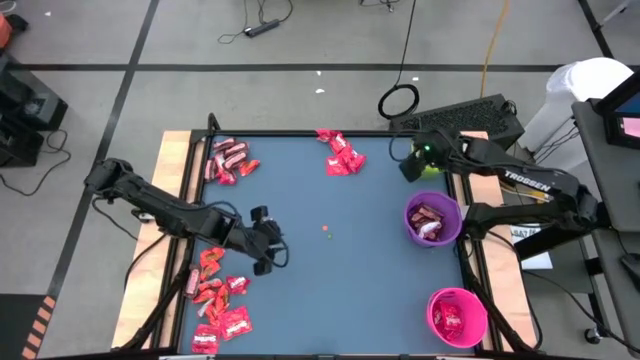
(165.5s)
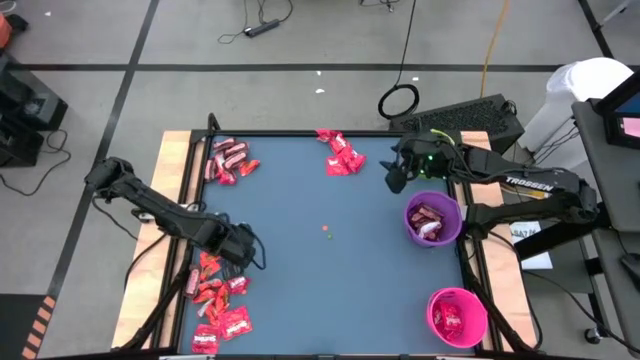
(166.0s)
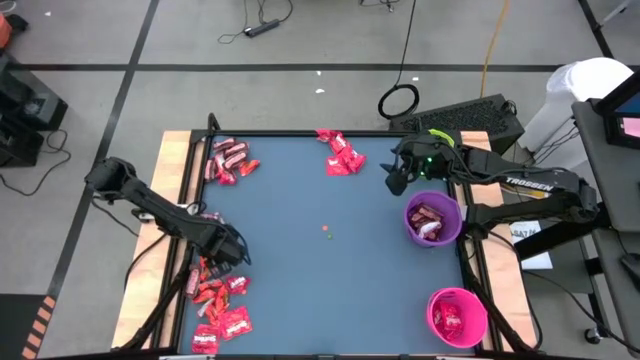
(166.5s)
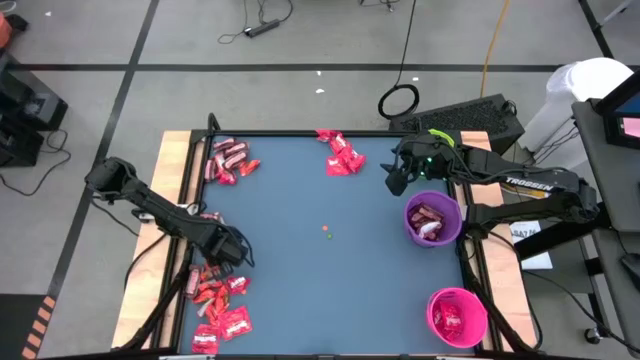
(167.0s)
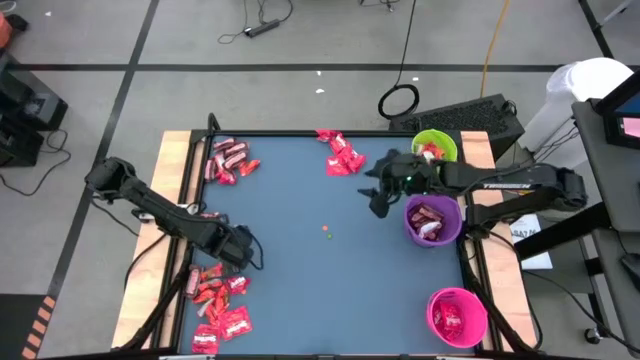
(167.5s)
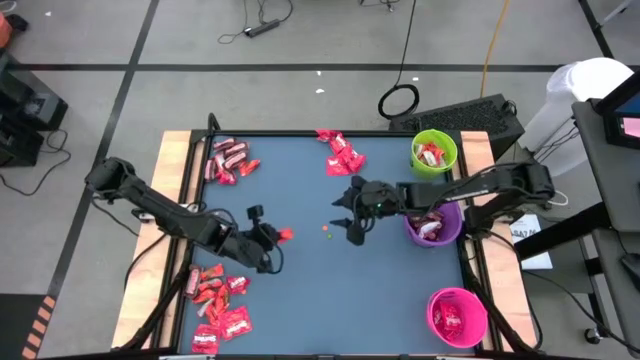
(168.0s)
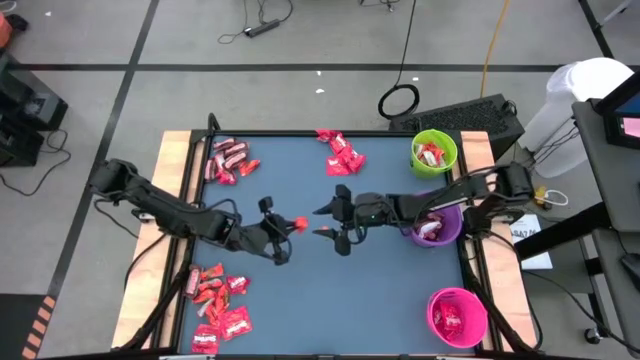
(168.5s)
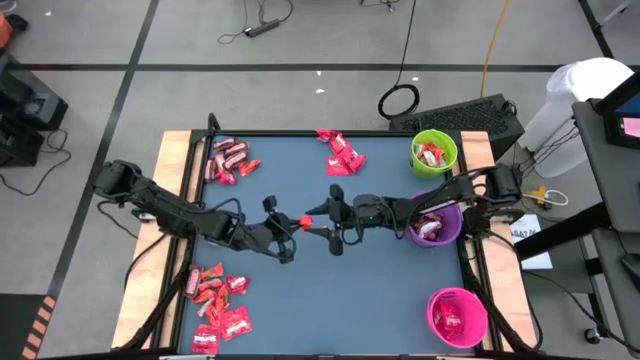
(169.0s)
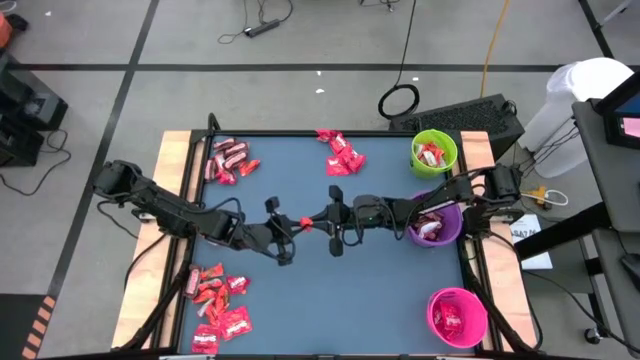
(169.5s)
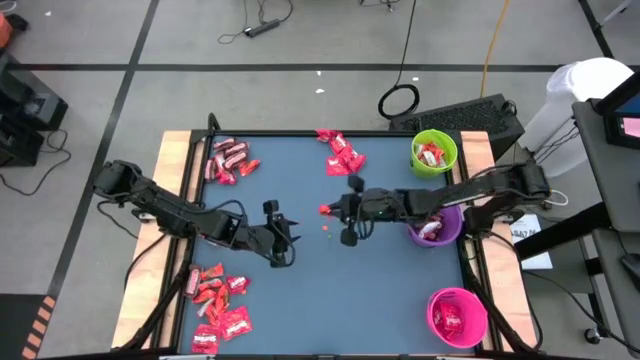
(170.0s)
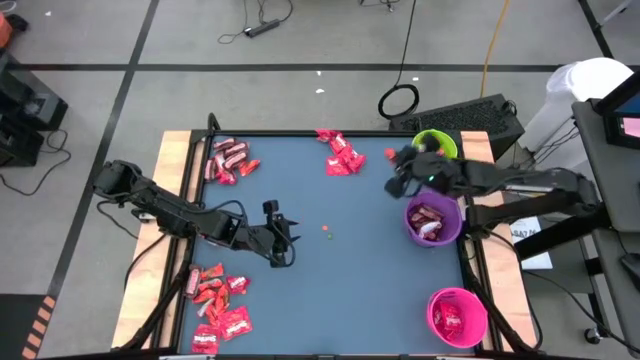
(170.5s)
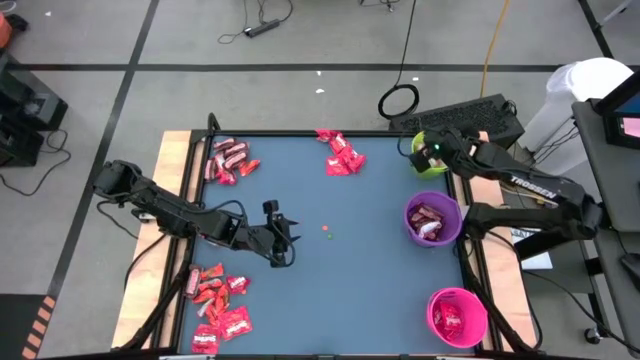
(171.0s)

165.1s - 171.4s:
Task: Organize candy in baskets
Put the orange chocolate bar into the green bucket

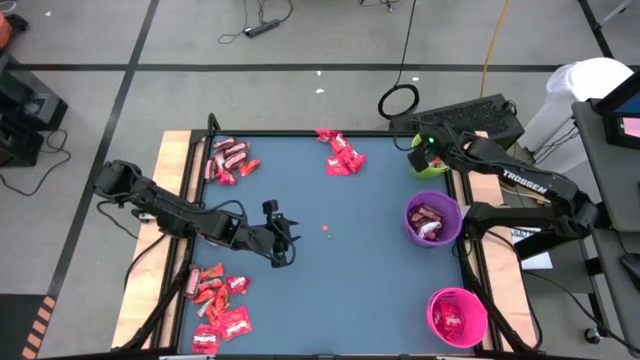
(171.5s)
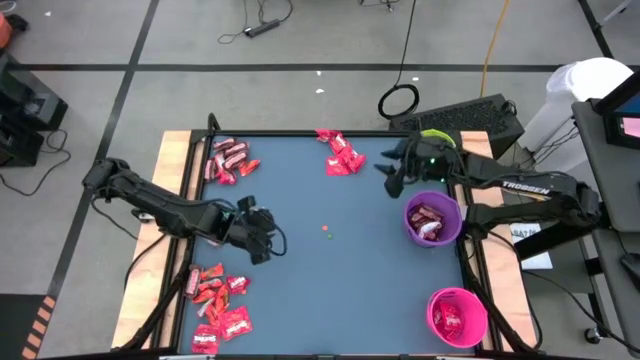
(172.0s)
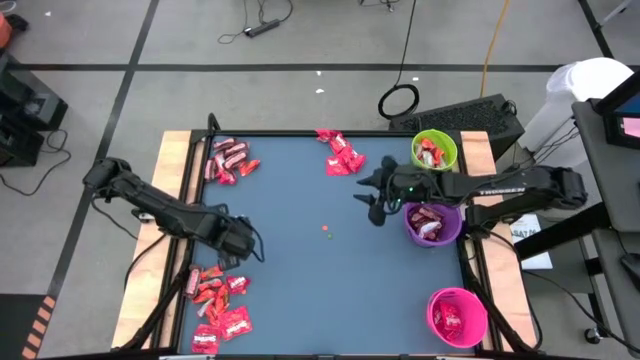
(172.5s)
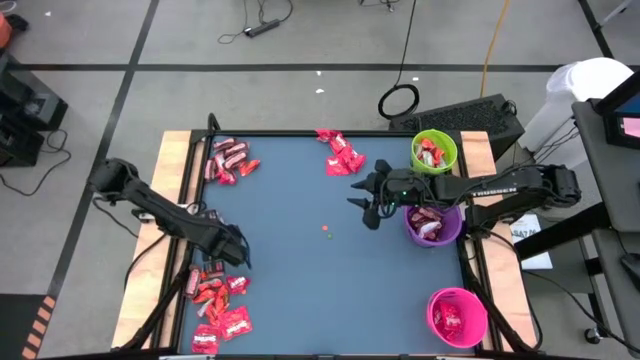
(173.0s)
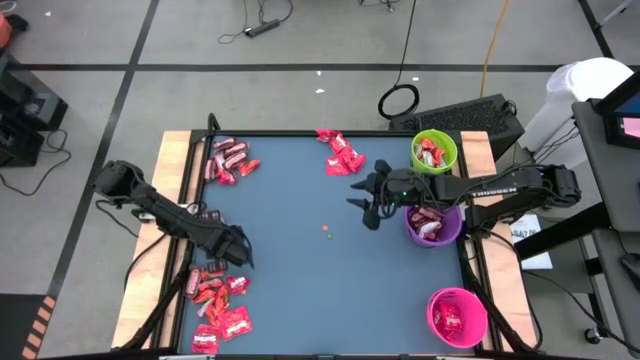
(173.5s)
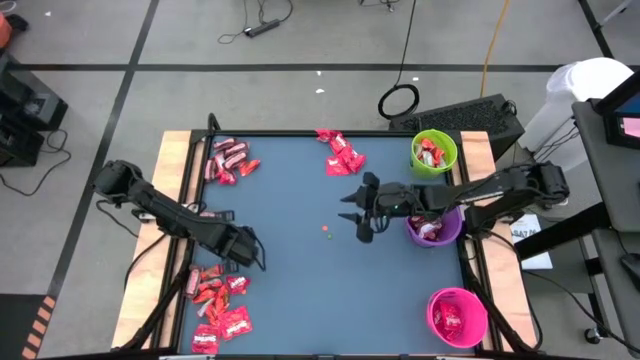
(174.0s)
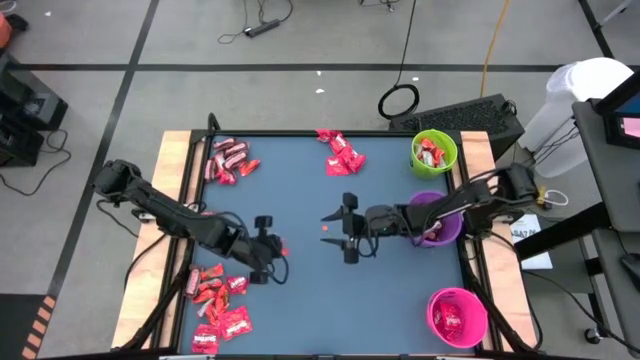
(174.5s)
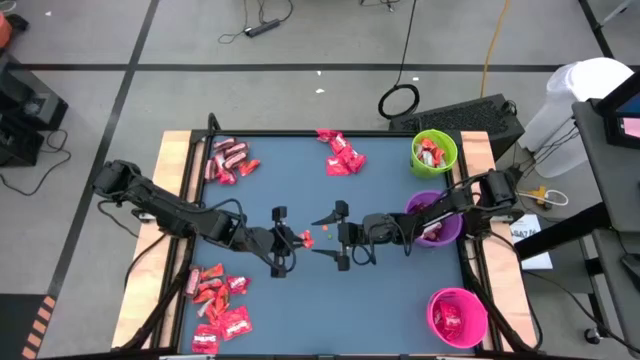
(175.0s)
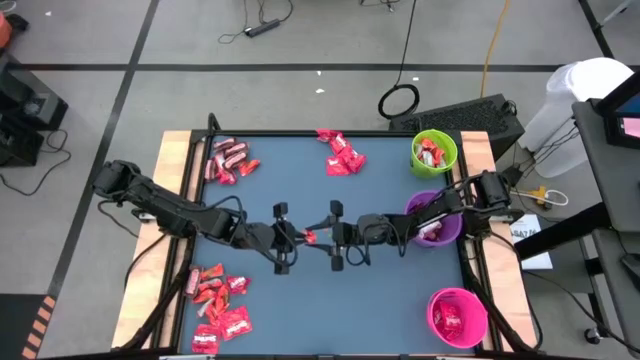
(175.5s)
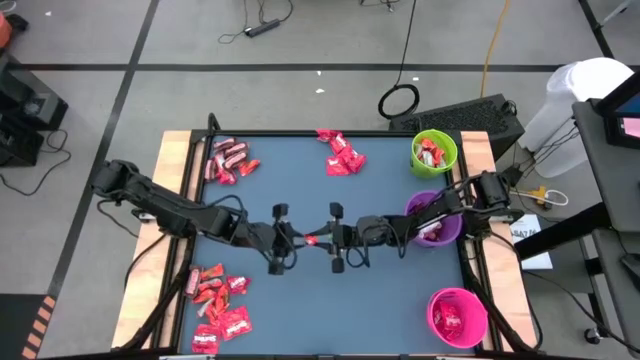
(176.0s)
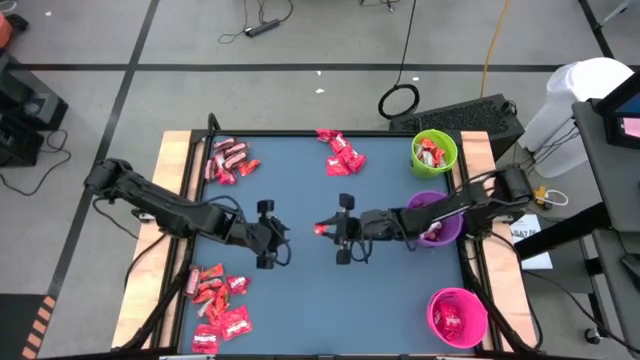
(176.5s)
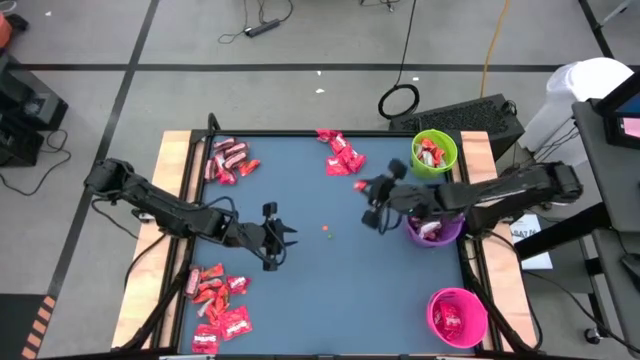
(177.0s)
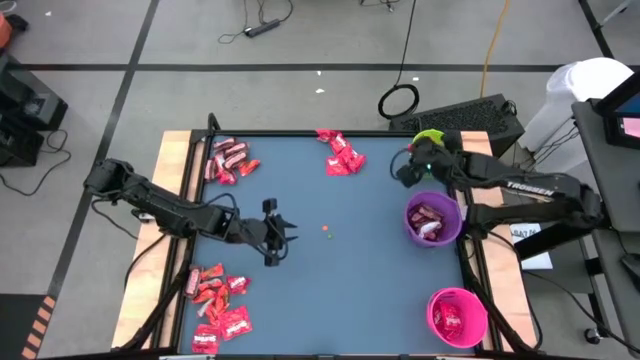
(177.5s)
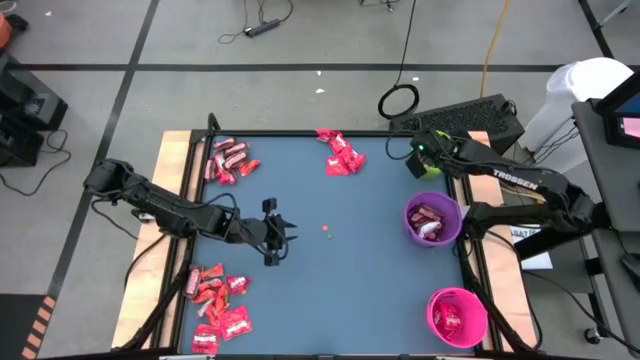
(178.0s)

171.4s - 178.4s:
Put the orange chocolate bar into the green bucket

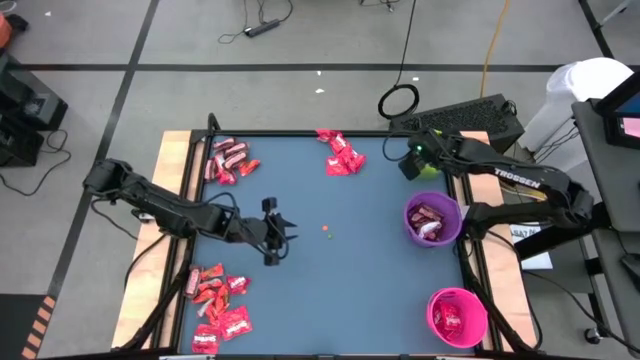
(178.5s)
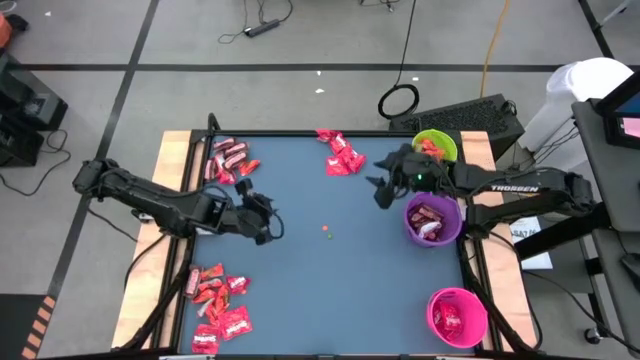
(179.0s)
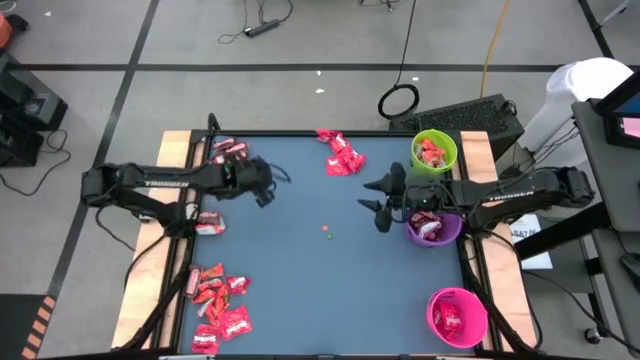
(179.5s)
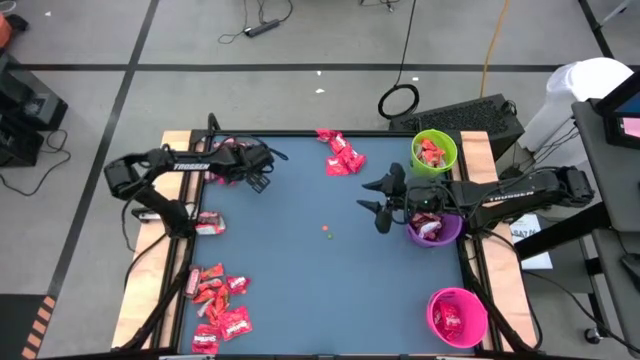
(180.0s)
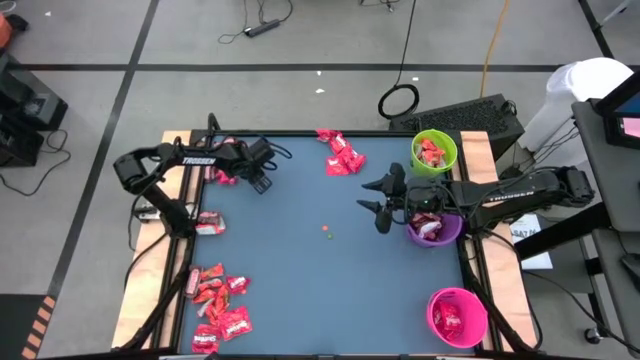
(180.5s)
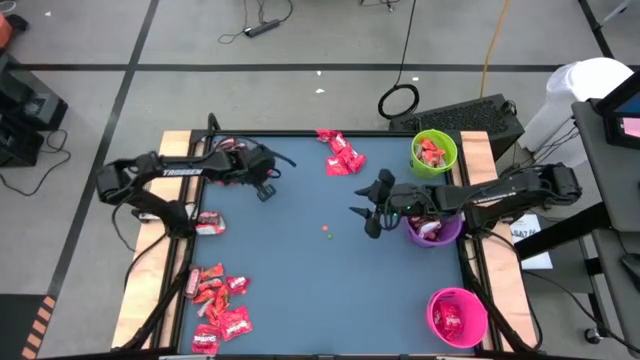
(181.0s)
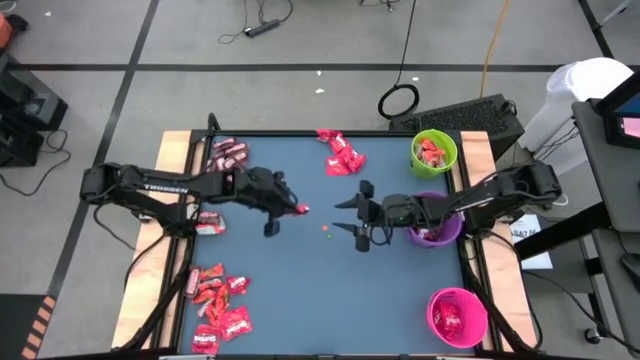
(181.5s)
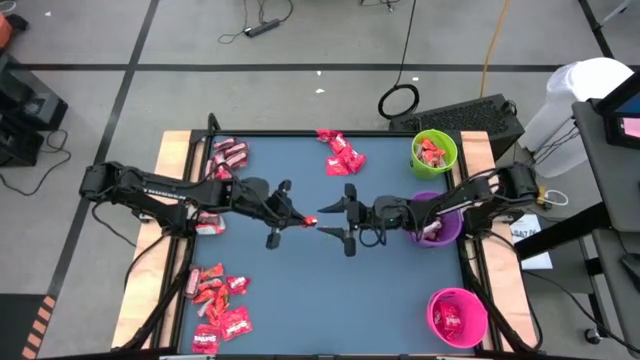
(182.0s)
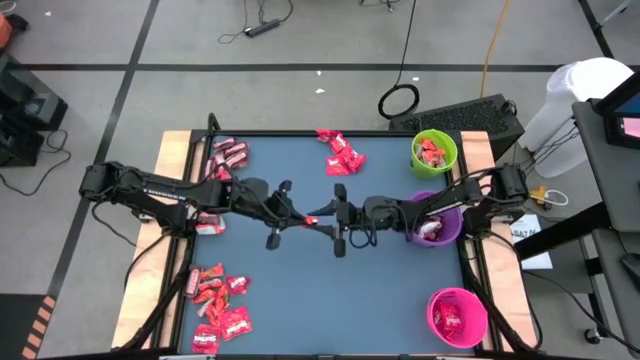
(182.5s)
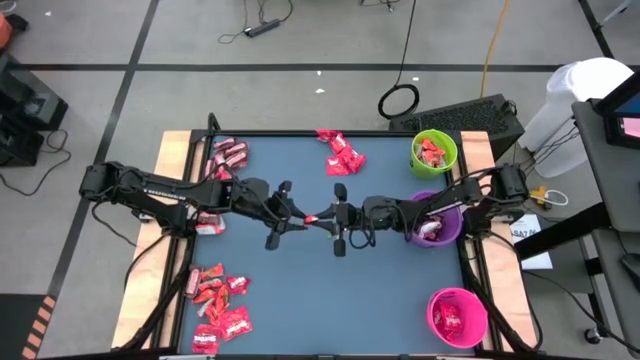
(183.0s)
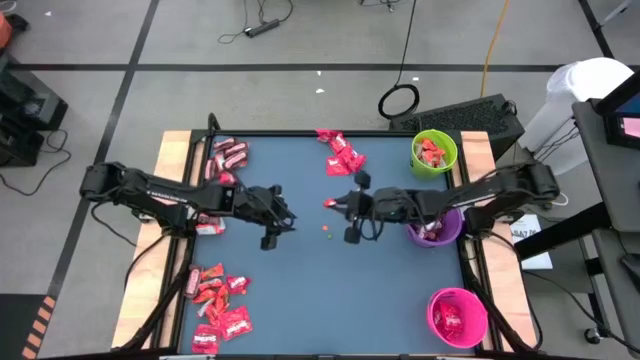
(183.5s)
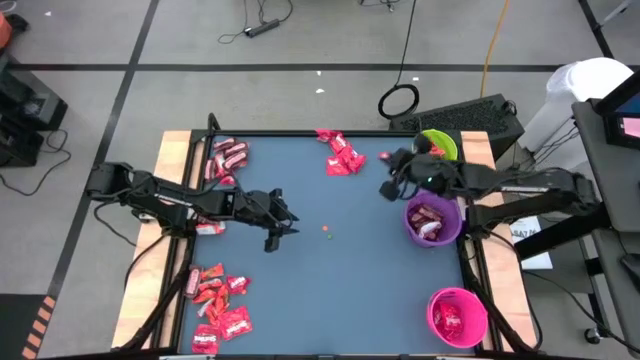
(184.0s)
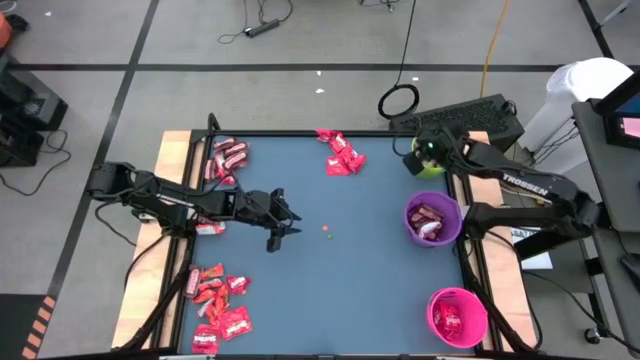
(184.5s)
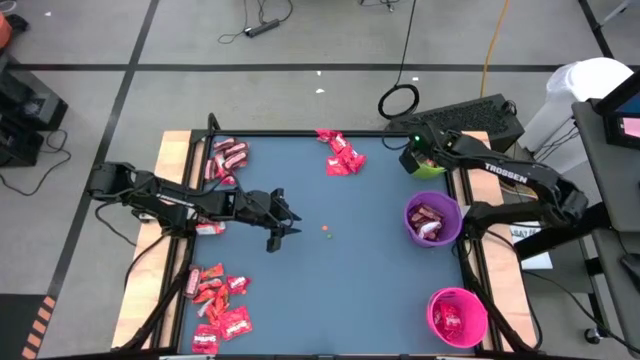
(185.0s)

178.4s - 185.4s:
Put the orange chocolate bar into the green bucket
